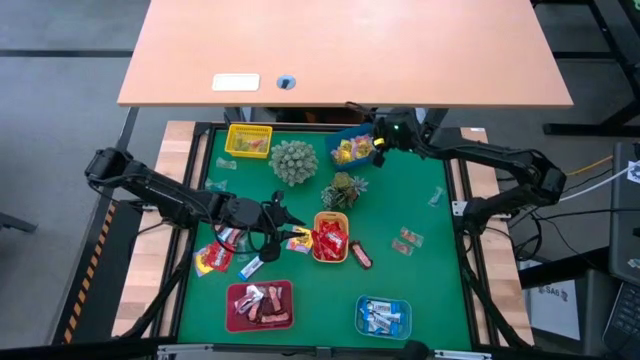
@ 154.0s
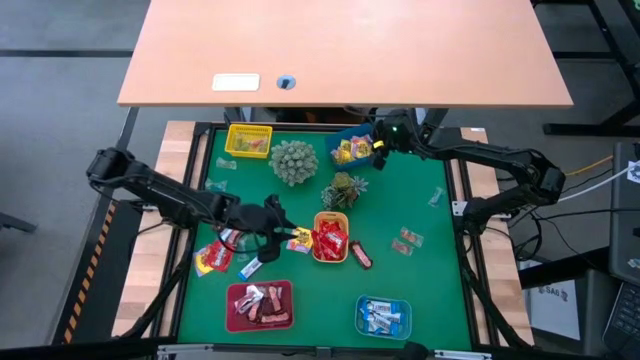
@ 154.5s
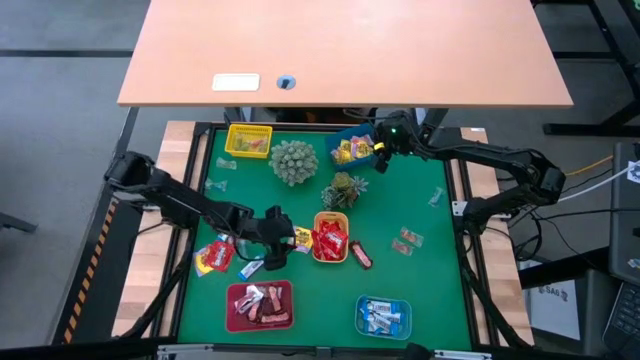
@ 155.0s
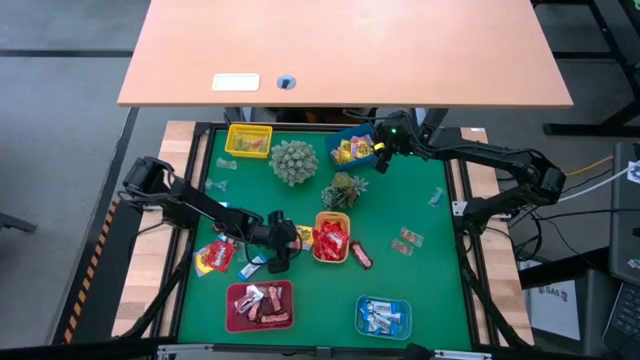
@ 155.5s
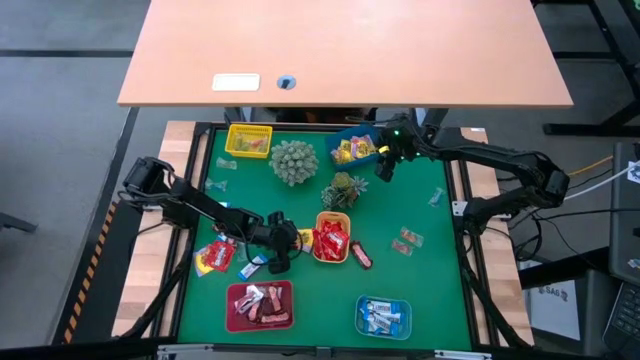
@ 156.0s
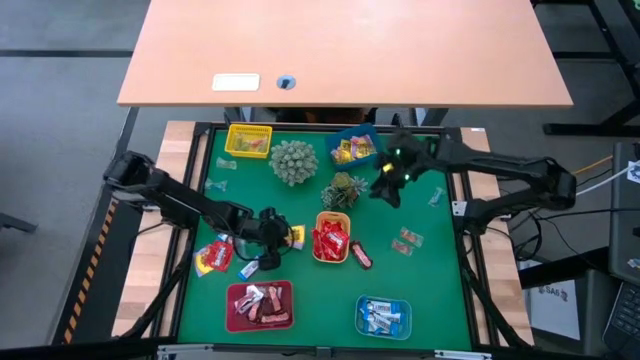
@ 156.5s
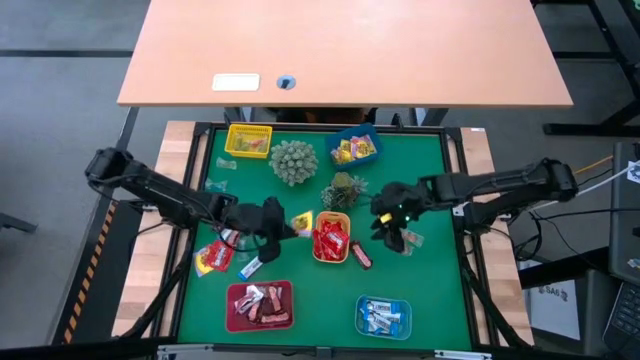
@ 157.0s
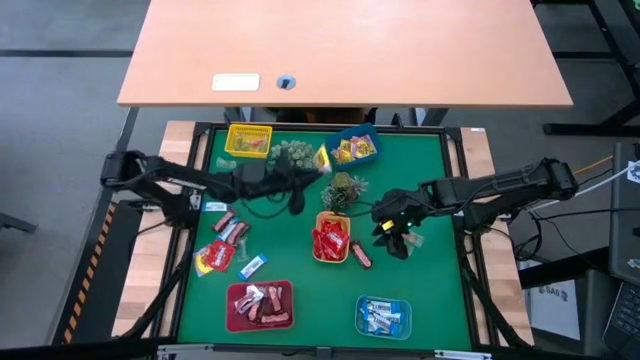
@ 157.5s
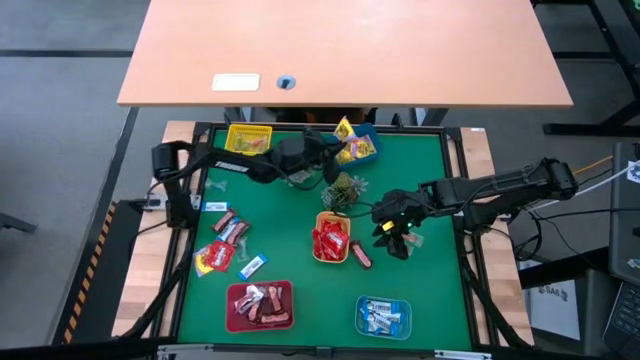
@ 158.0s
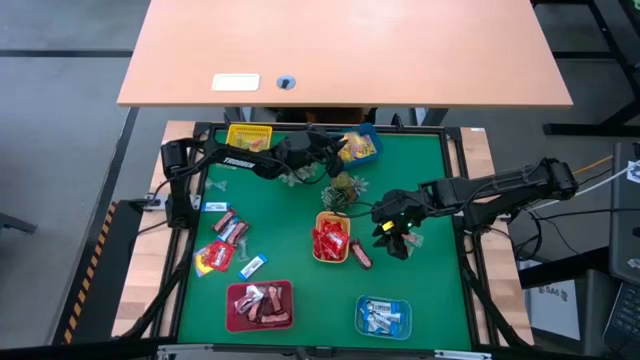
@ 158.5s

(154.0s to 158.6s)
Task: Sort candy
Put the yellow candy into the blue bin

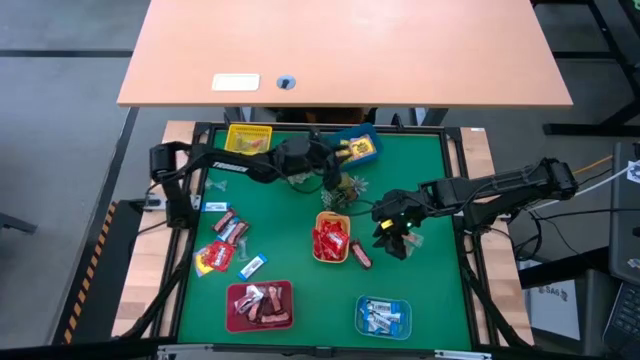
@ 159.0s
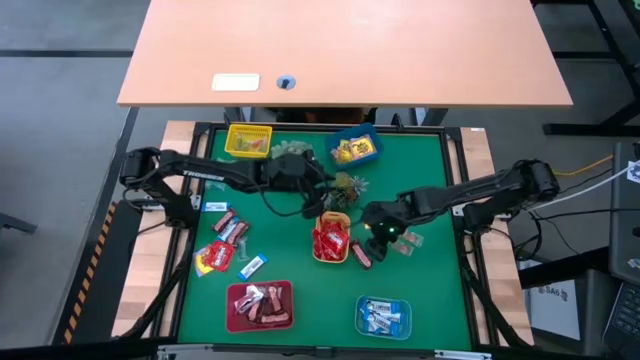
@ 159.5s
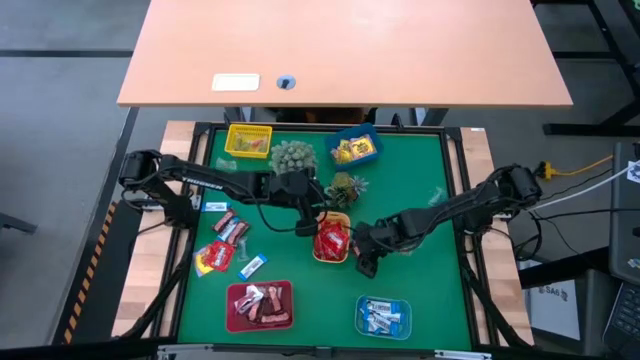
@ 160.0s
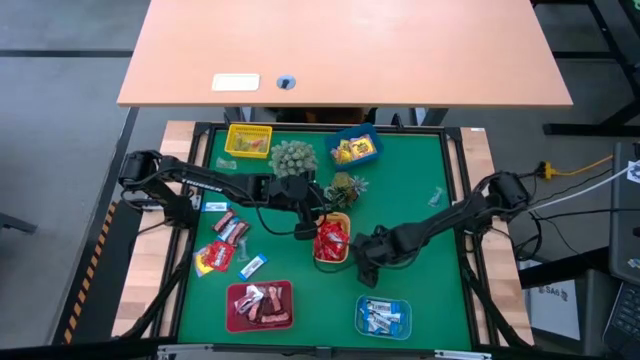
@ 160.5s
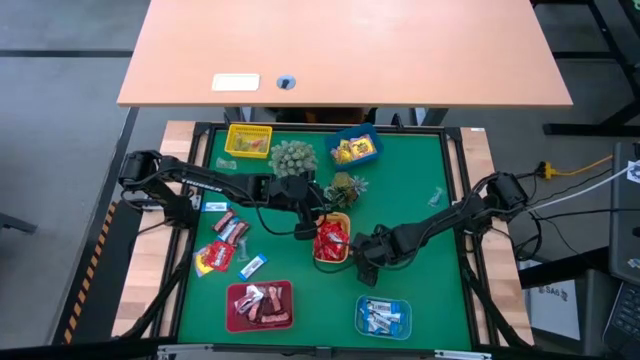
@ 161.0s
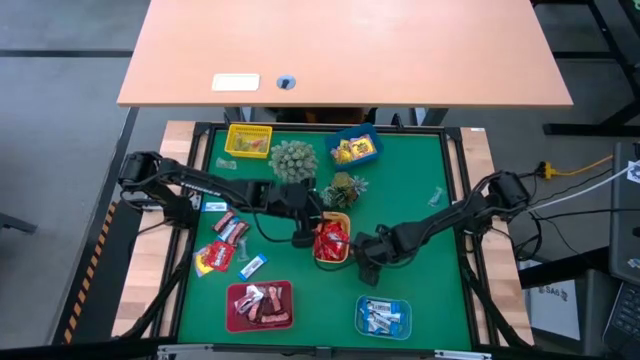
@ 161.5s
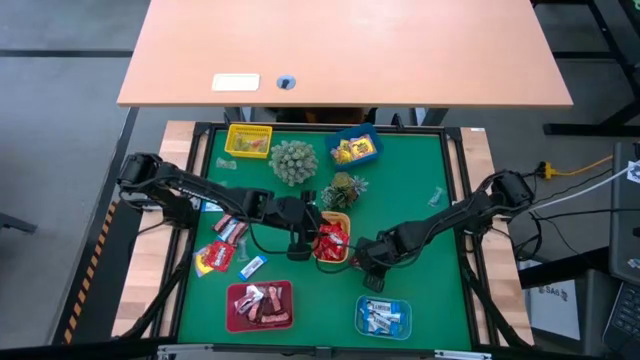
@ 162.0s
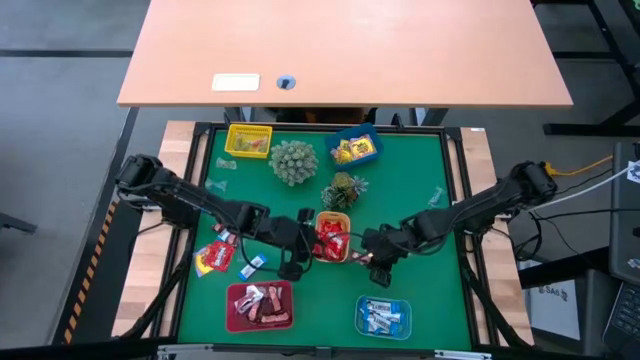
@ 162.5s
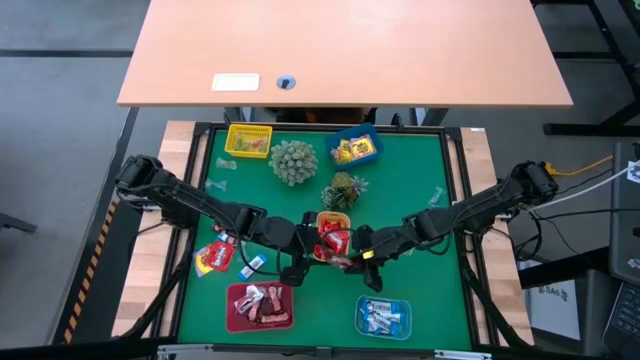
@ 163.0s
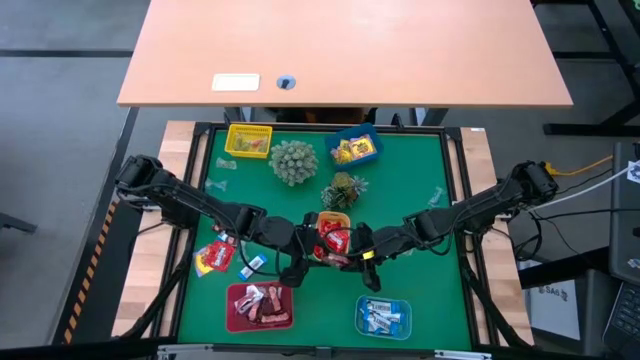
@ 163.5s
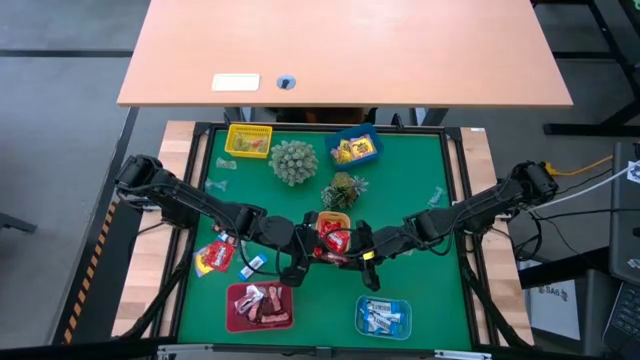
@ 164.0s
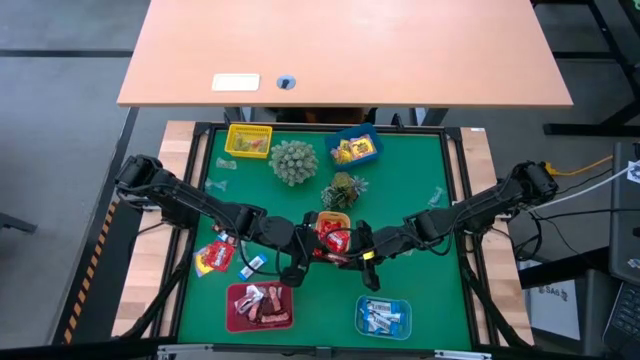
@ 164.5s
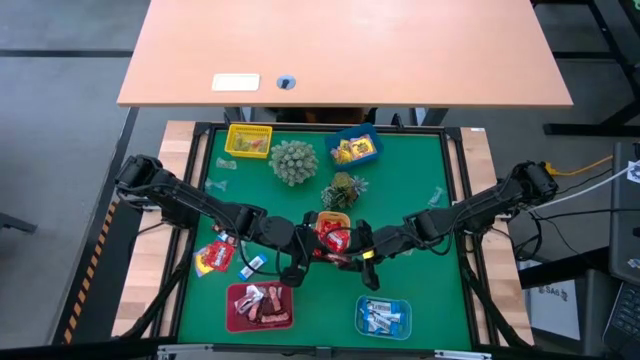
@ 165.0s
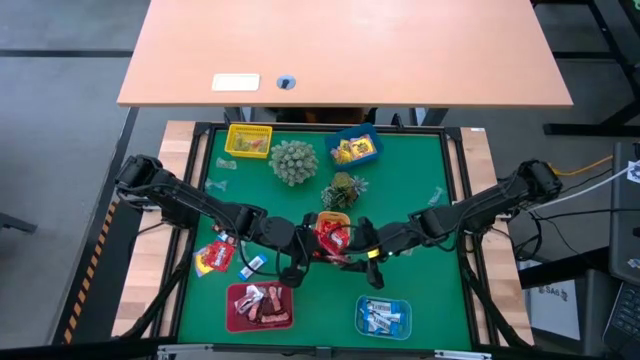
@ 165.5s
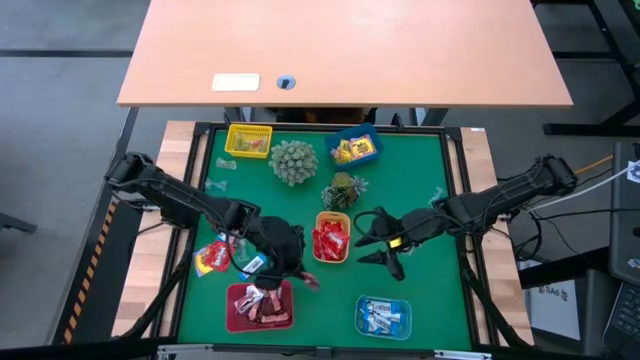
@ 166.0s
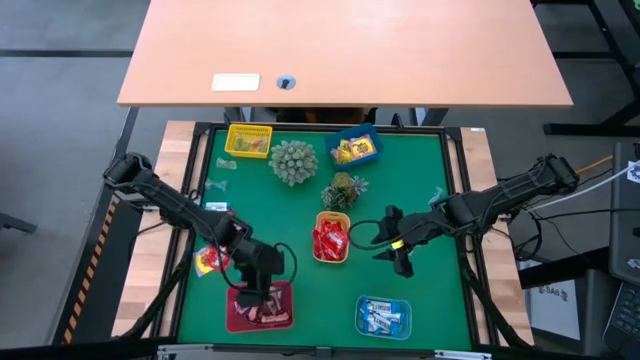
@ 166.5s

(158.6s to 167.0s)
Put the brown chocolate bar into the red bin

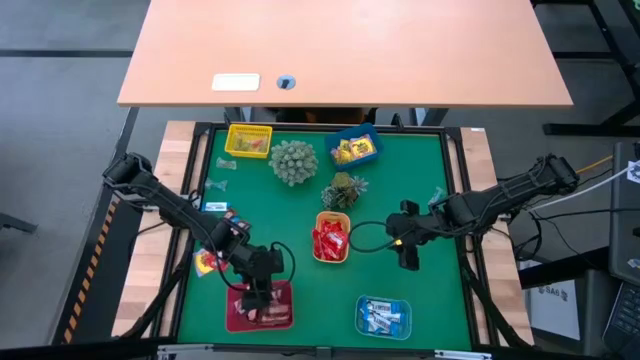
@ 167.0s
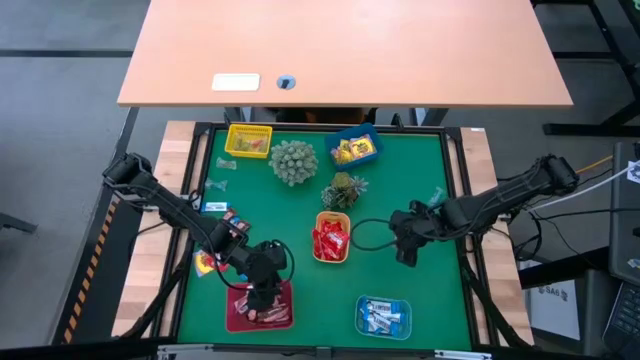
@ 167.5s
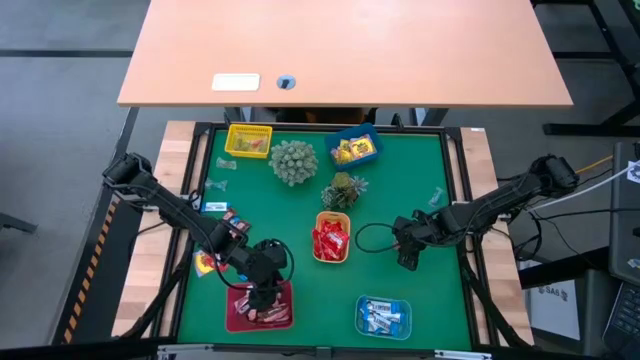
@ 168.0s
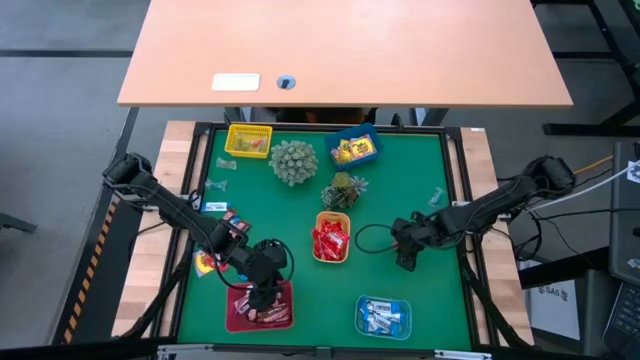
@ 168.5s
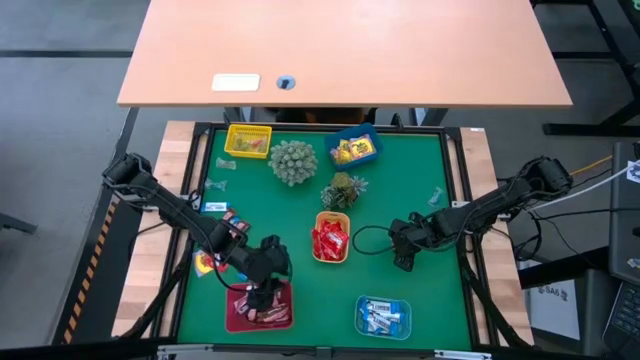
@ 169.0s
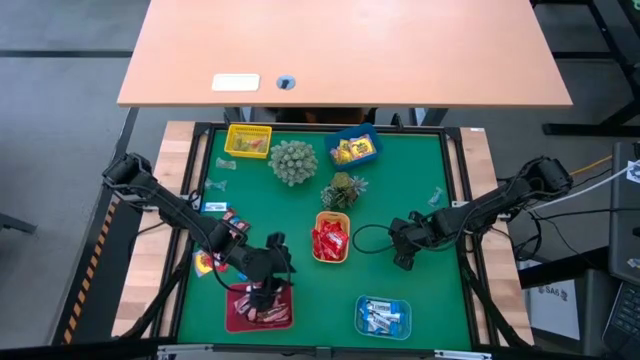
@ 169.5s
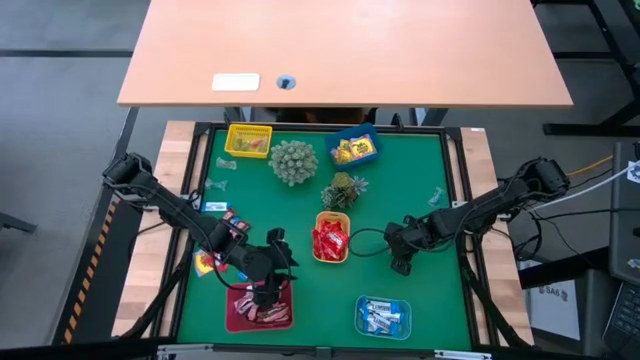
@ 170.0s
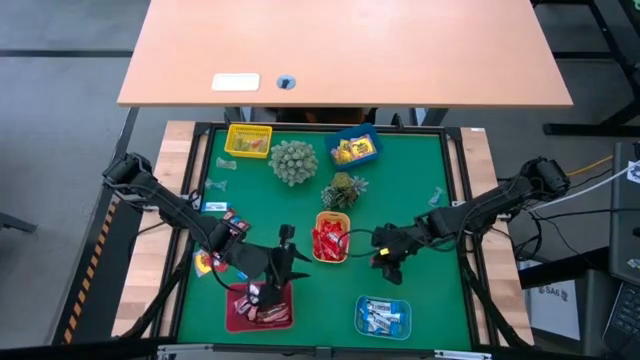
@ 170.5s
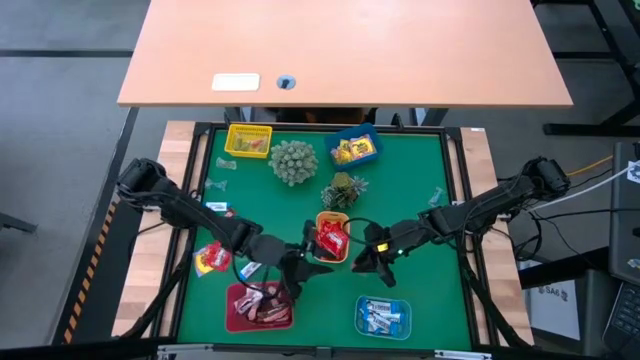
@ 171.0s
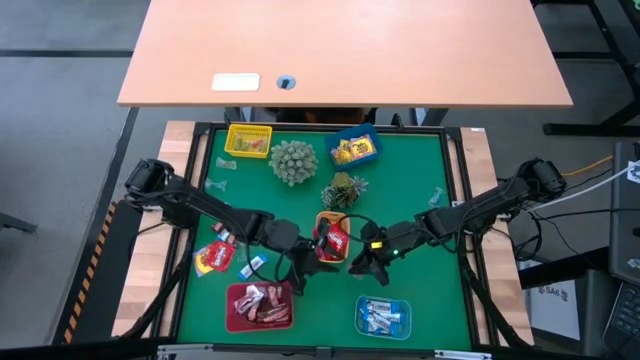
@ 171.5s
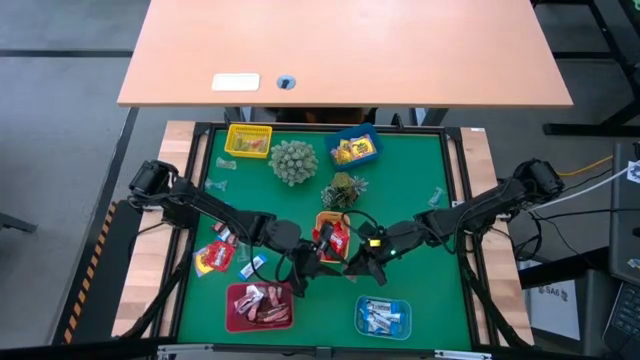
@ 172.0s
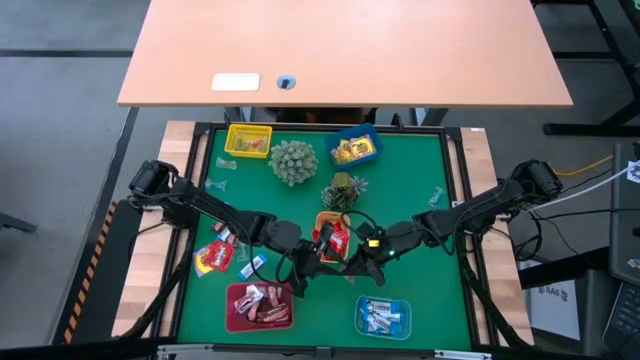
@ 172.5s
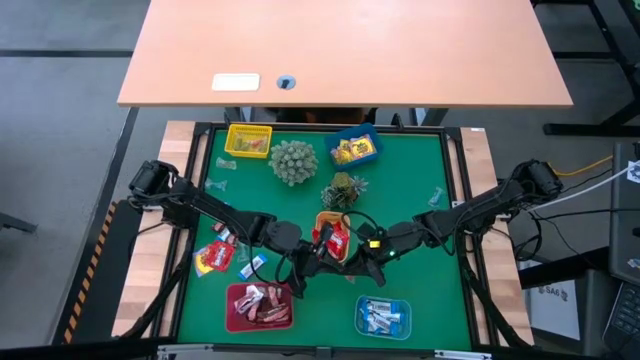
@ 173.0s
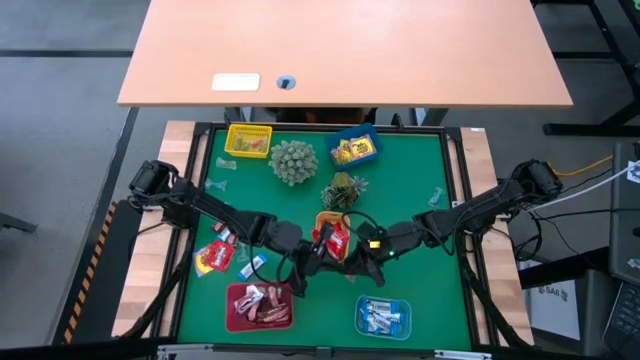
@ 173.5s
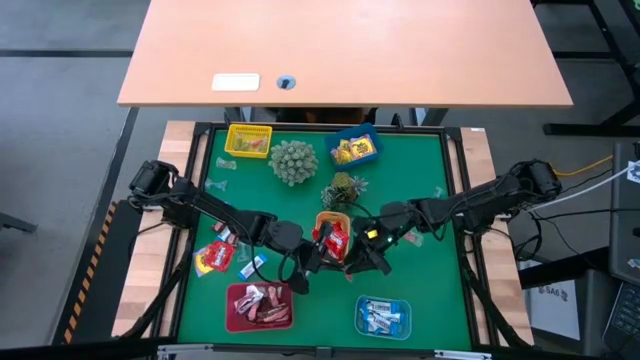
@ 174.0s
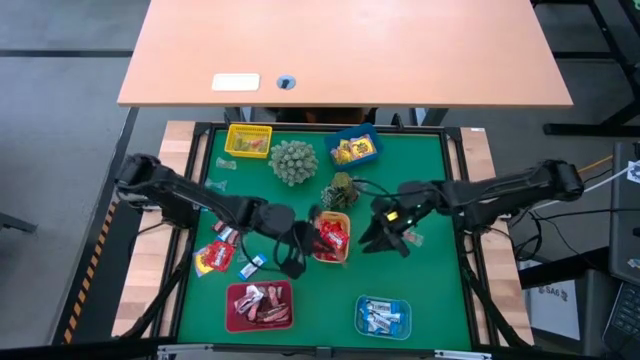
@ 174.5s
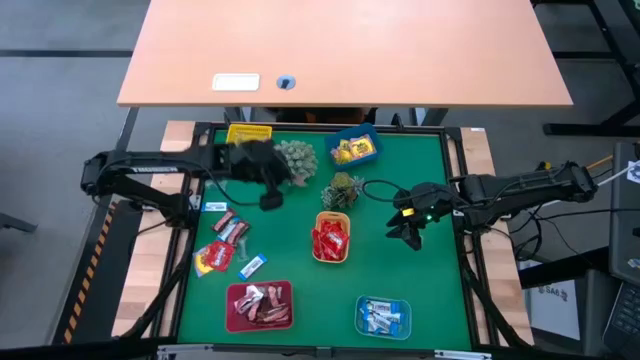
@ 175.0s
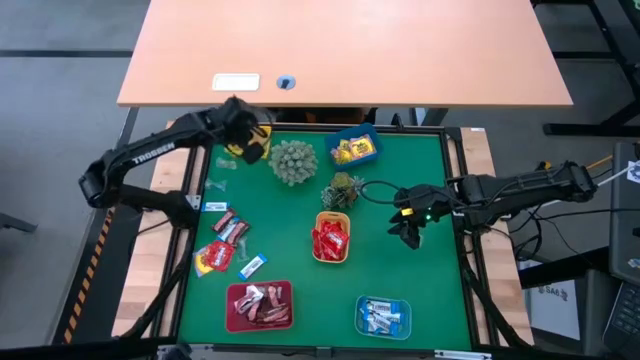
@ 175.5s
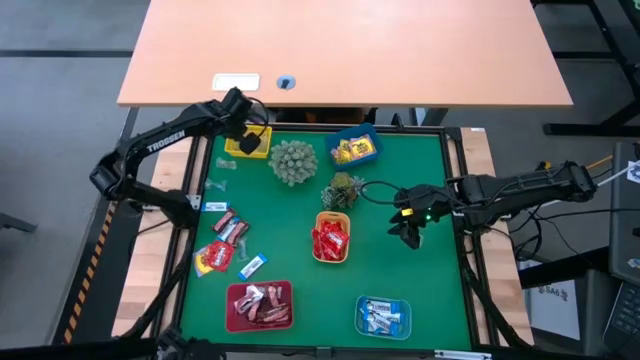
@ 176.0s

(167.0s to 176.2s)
Put the orange gummy into the yellow bin
